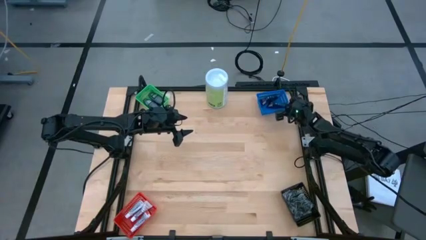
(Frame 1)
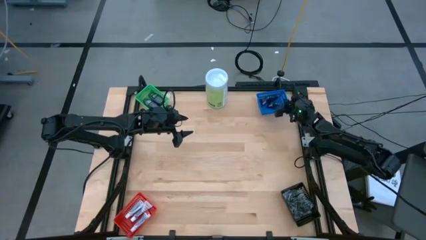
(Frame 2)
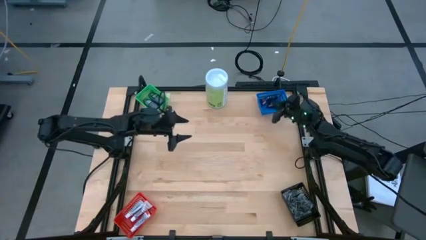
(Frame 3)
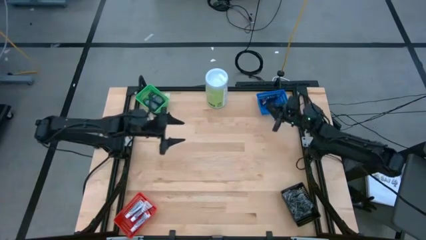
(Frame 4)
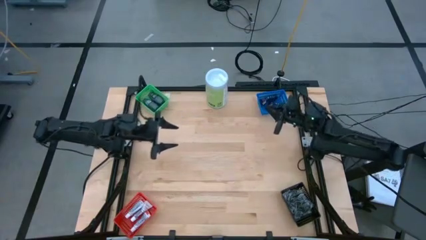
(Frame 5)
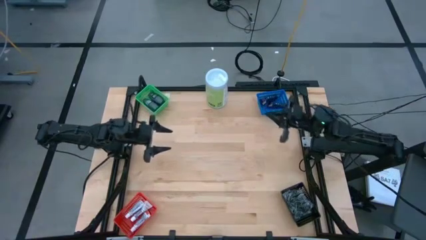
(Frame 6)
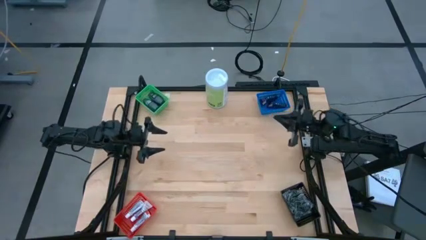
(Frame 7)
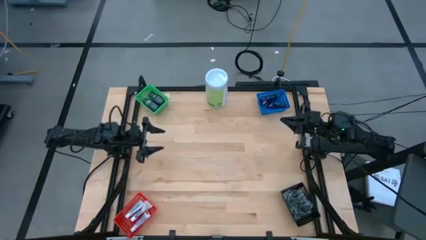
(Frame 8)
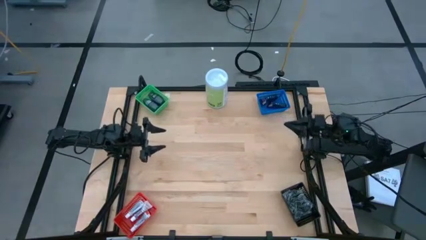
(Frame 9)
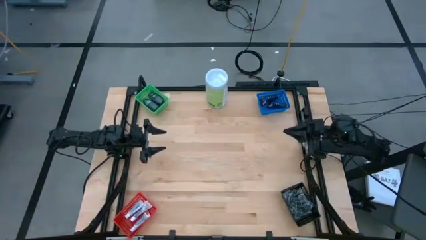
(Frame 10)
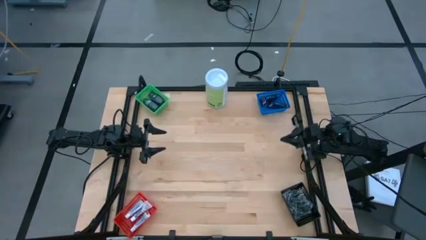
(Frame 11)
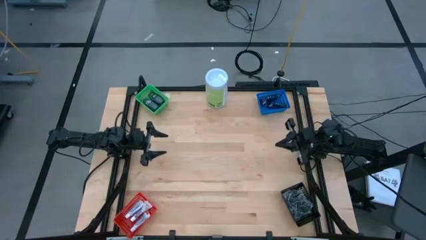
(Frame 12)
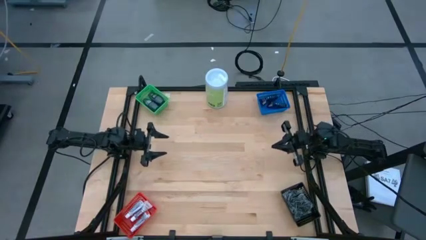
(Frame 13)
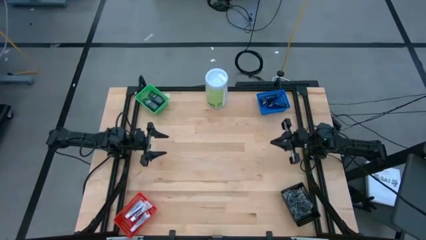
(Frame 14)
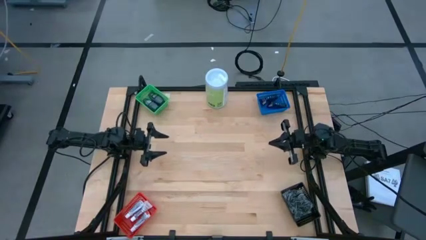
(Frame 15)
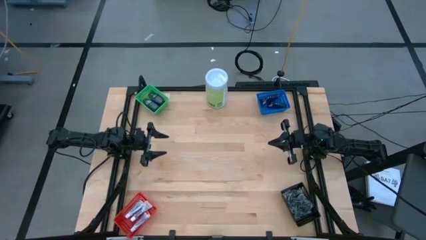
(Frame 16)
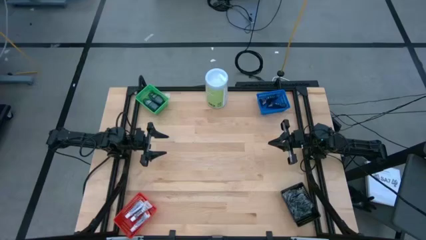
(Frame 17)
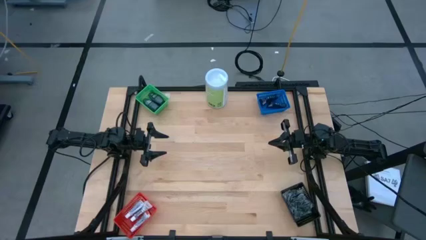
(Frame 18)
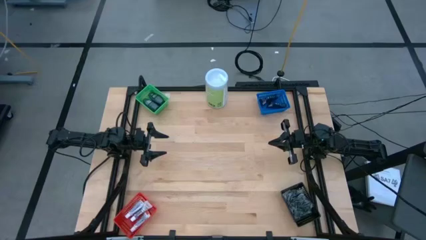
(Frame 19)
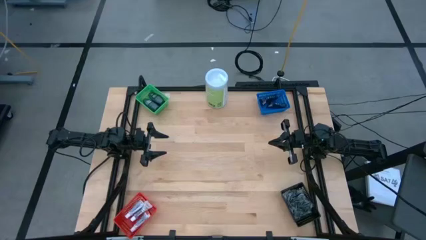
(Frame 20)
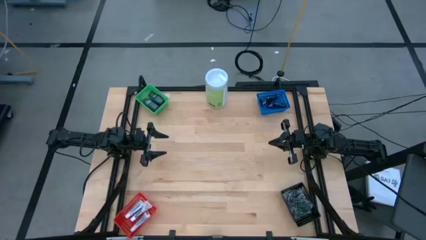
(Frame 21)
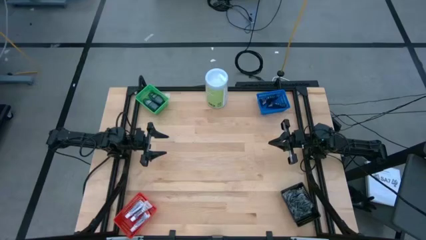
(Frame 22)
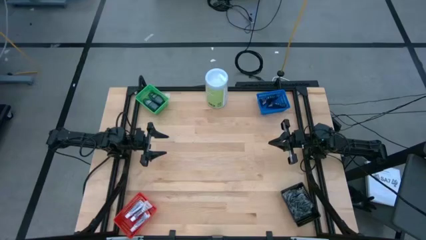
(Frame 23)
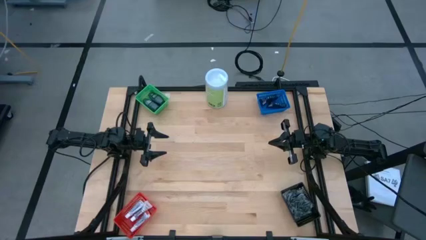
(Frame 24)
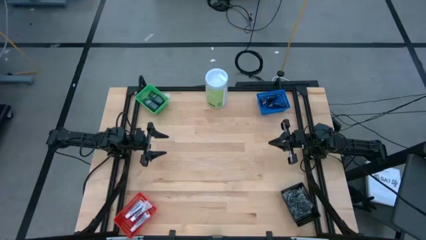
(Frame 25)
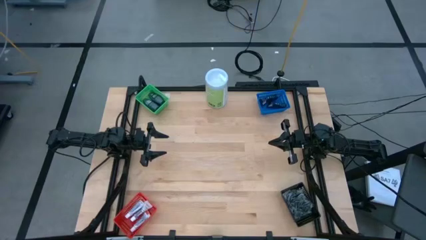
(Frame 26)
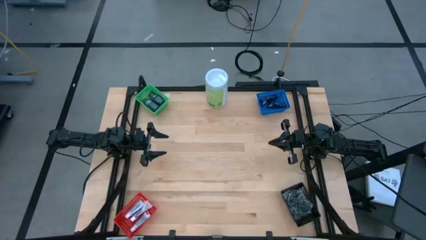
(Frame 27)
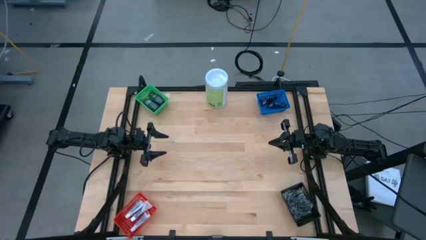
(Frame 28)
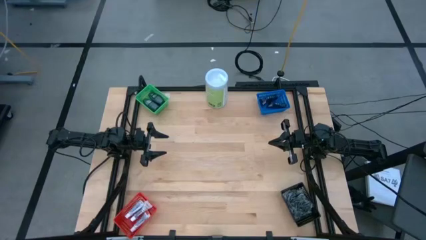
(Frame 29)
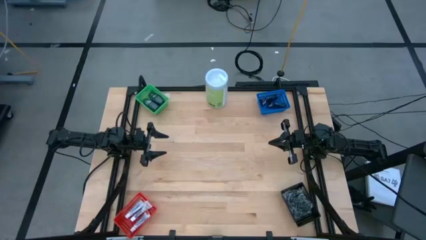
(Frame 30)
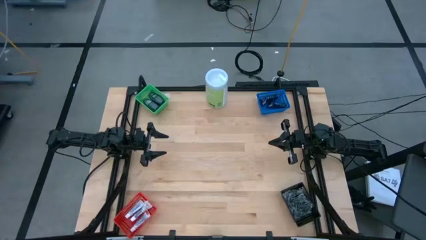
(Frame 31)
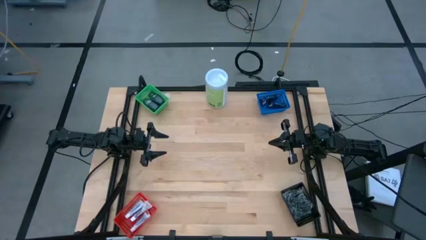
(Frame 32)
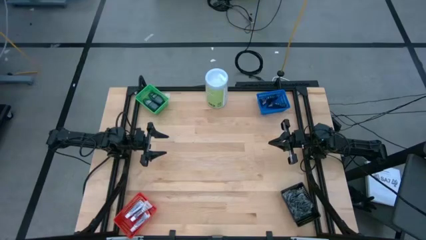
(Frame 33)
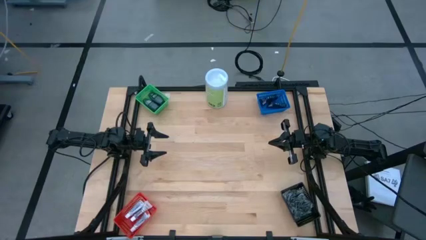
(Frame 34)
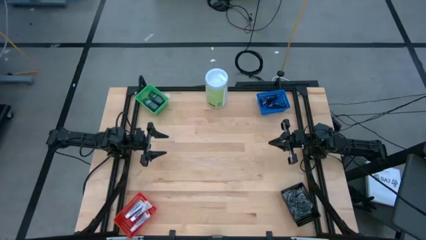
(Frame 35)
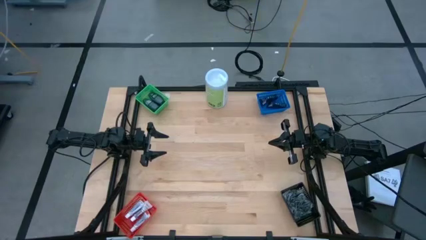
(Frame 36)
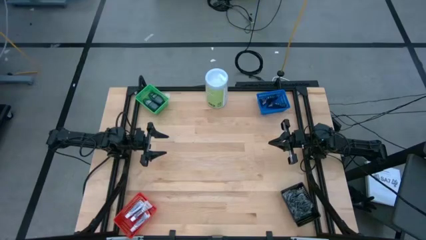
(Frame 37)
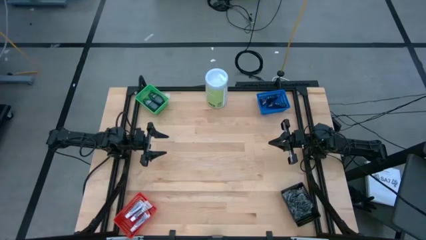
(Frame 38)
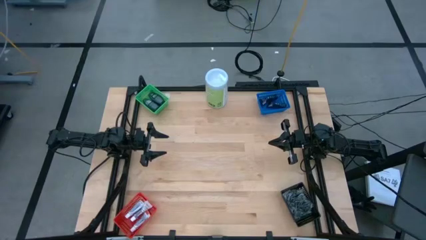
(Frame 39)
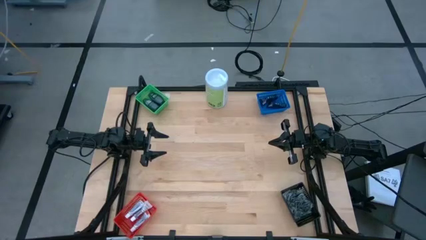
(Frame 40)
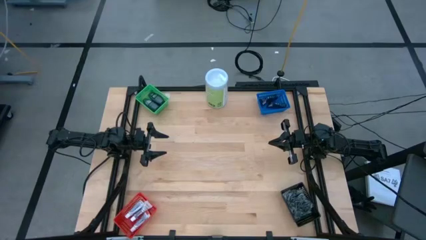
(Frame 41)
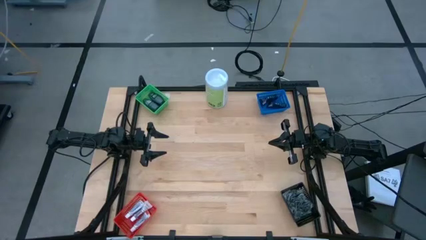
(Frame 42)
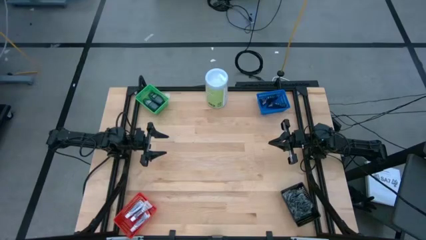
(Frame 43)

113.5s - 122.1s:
Task: Pick & Place Travel size toiletries
Return to Home Position
